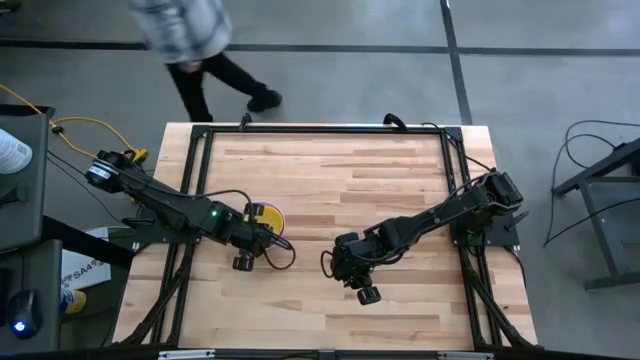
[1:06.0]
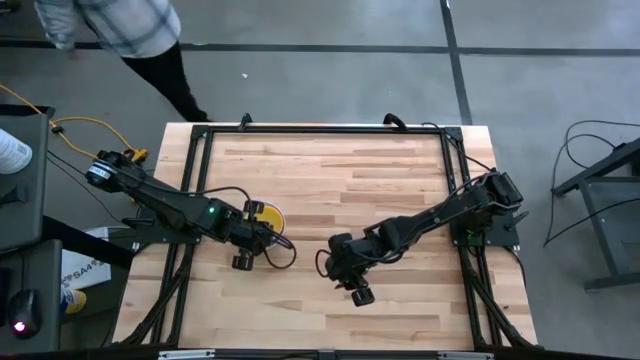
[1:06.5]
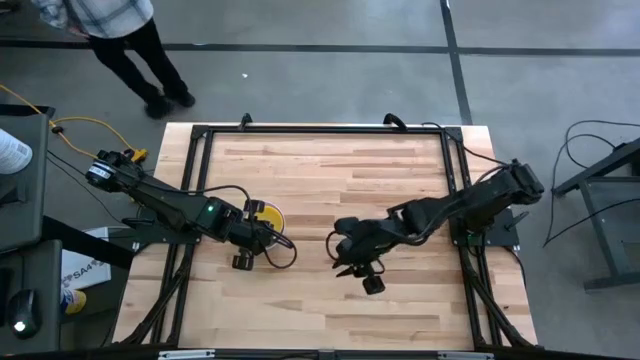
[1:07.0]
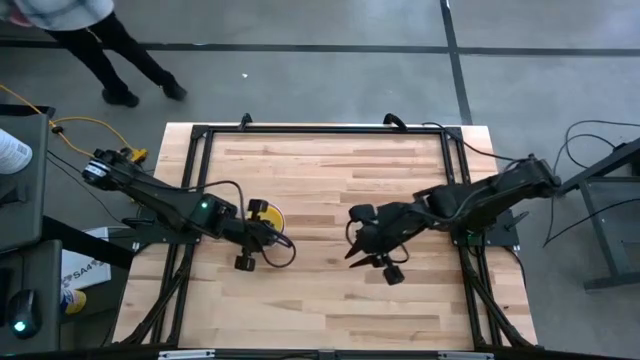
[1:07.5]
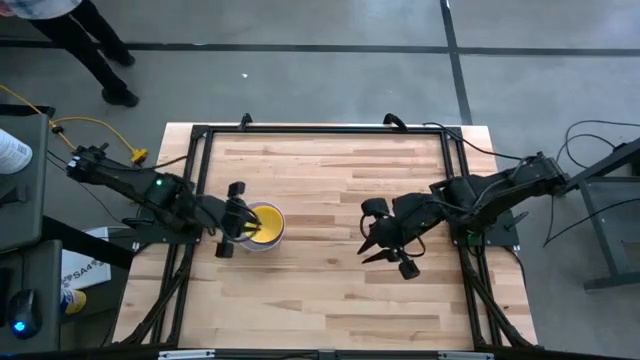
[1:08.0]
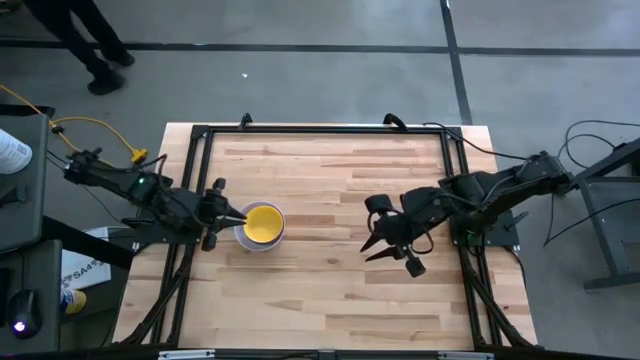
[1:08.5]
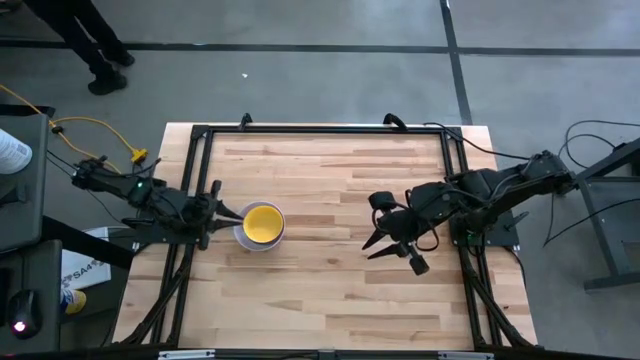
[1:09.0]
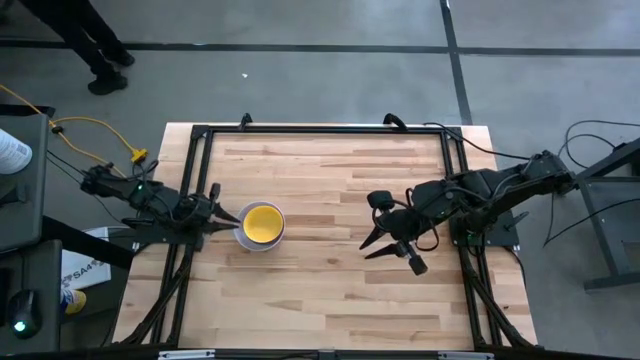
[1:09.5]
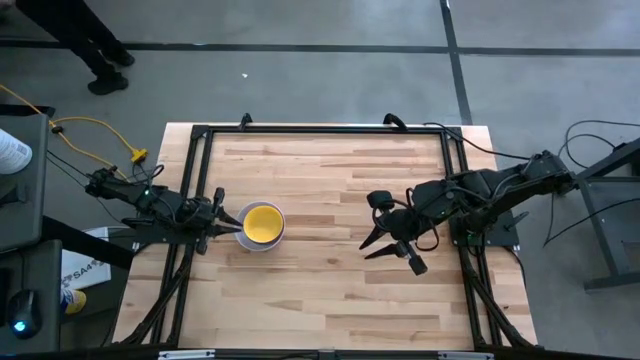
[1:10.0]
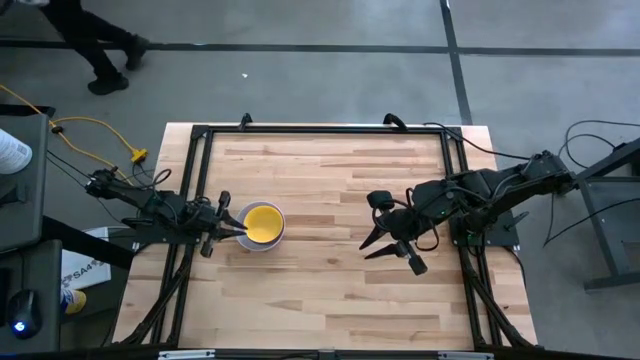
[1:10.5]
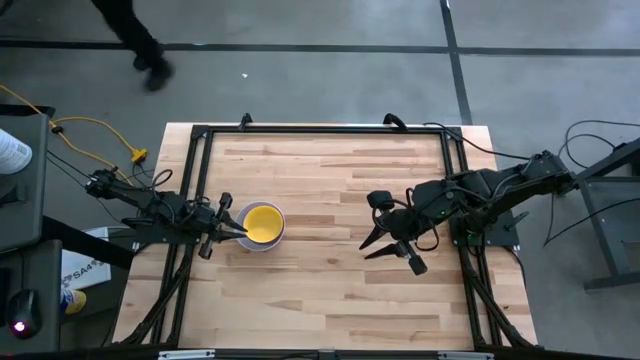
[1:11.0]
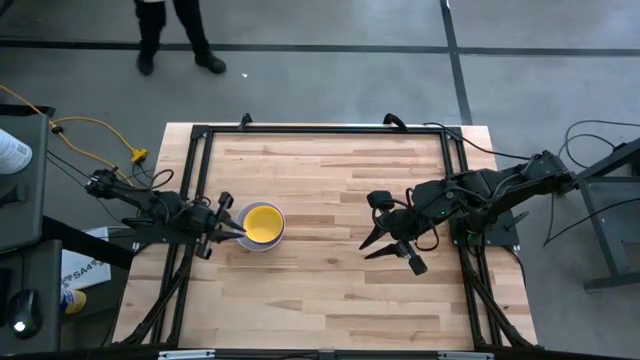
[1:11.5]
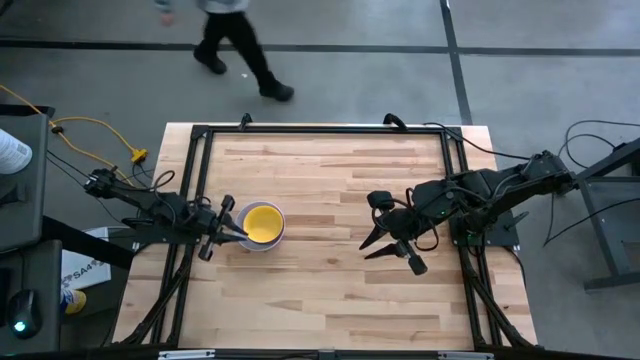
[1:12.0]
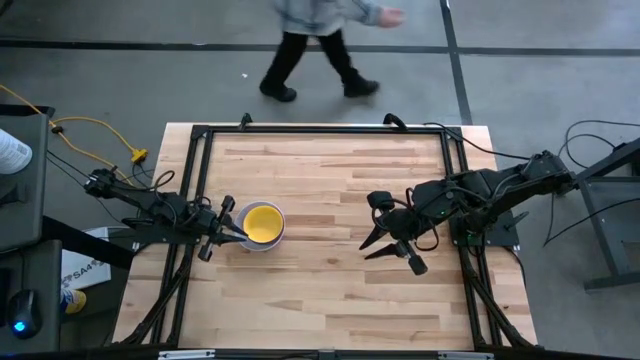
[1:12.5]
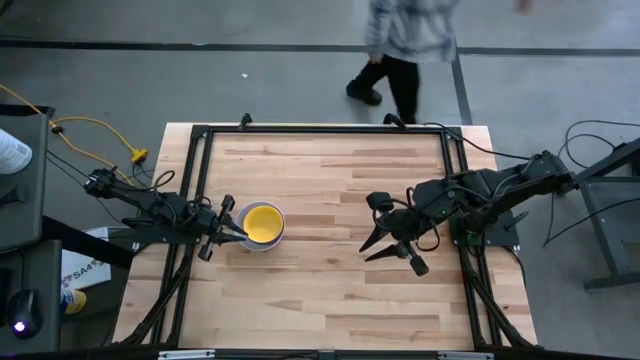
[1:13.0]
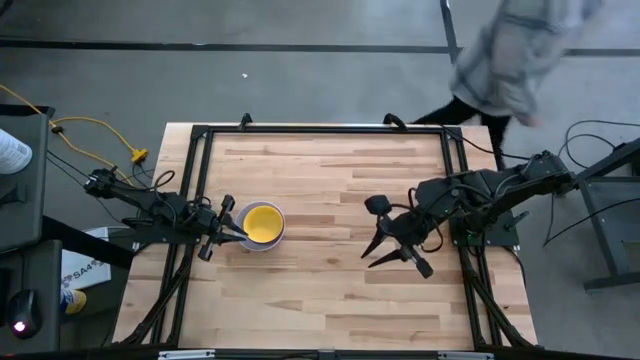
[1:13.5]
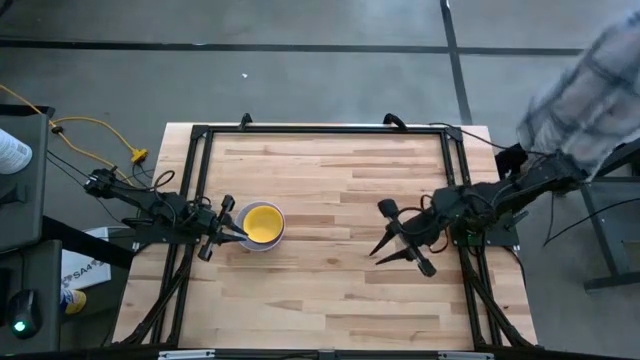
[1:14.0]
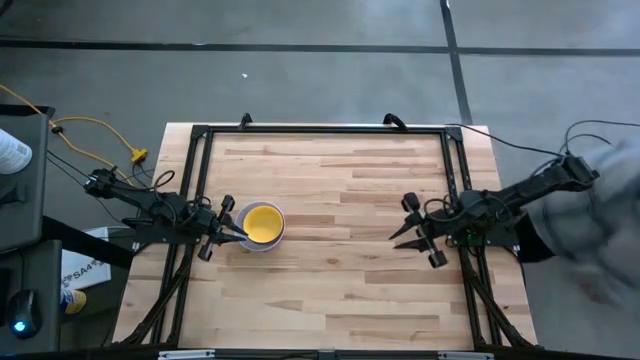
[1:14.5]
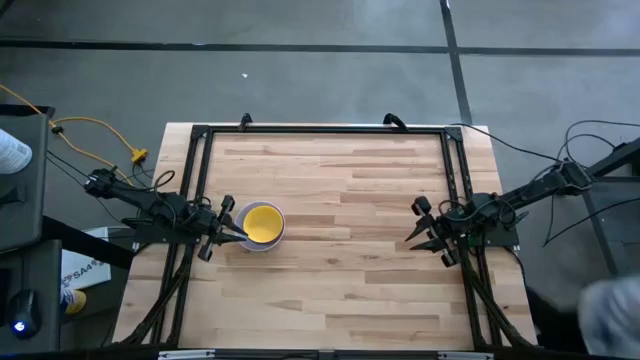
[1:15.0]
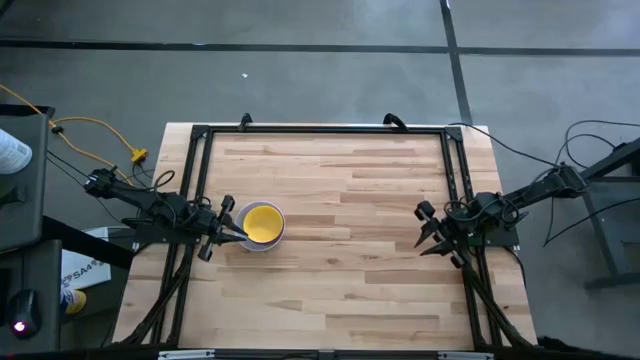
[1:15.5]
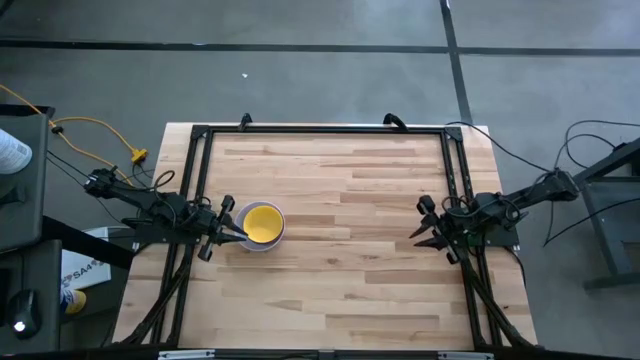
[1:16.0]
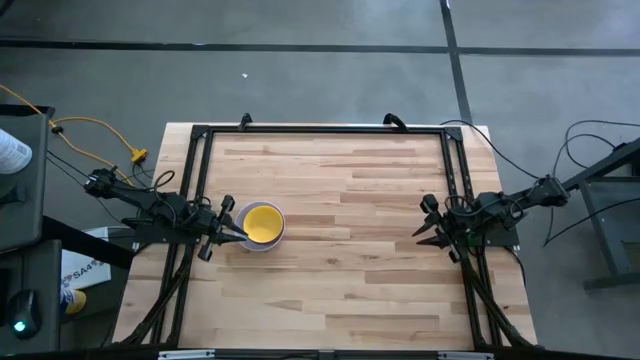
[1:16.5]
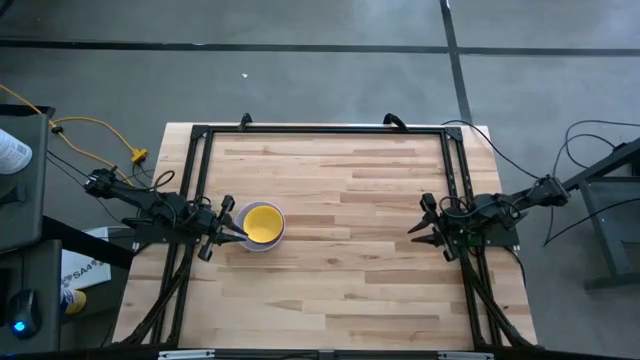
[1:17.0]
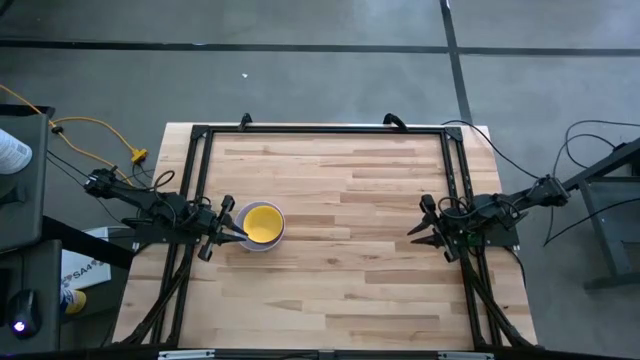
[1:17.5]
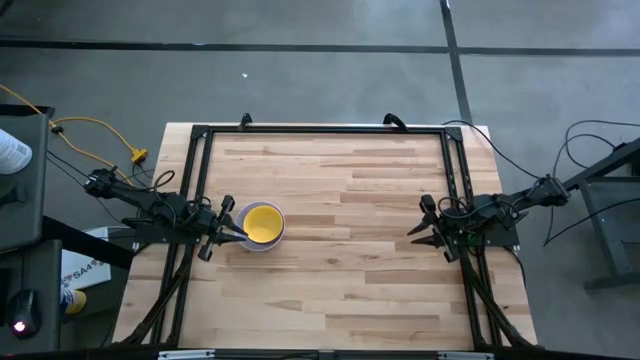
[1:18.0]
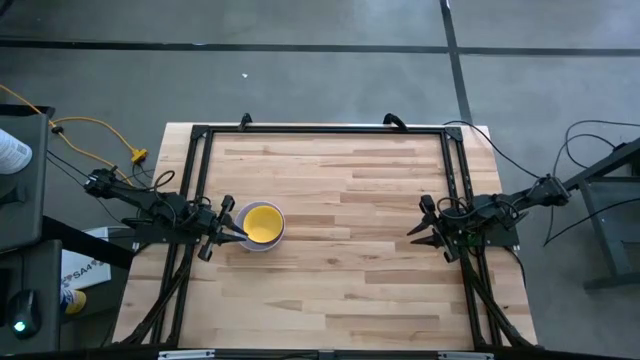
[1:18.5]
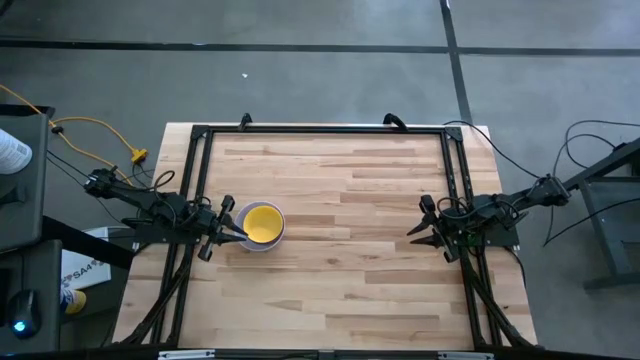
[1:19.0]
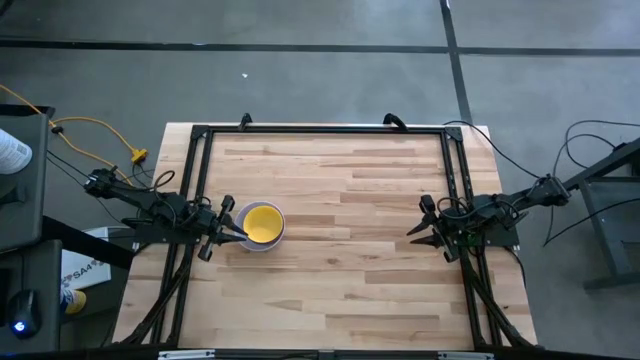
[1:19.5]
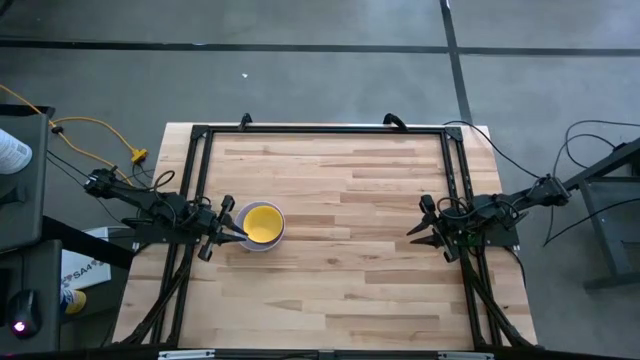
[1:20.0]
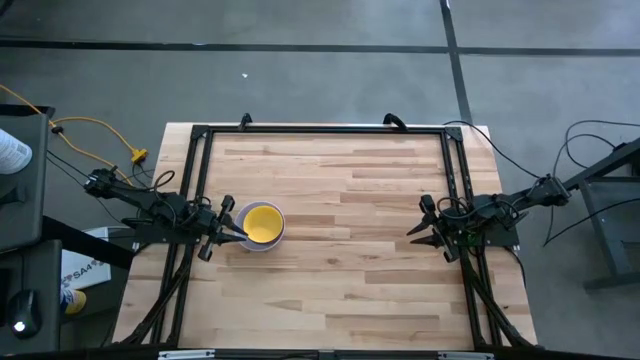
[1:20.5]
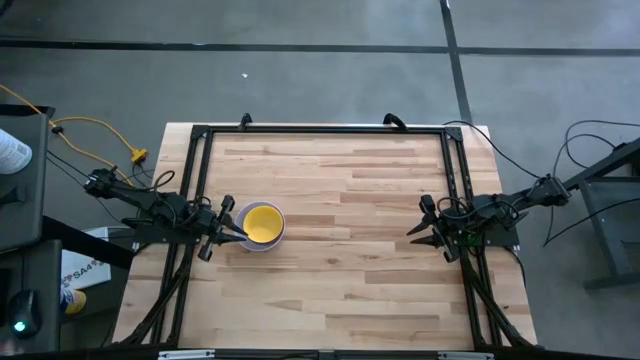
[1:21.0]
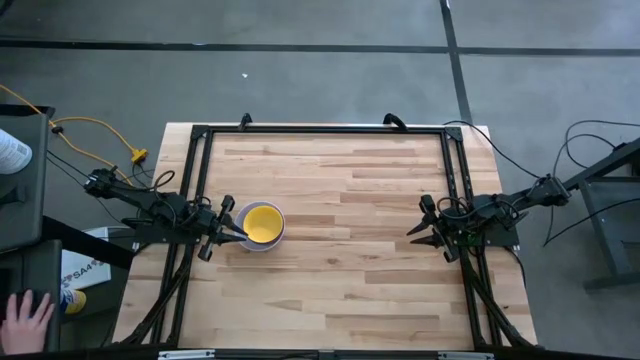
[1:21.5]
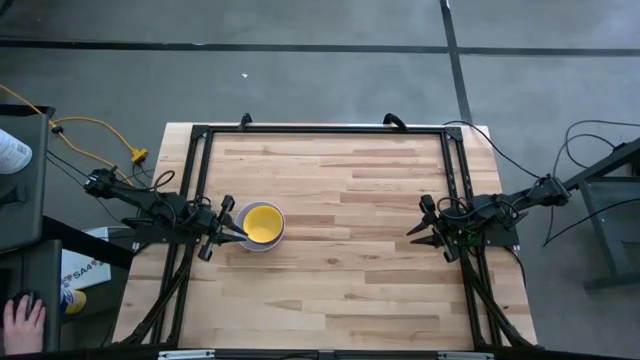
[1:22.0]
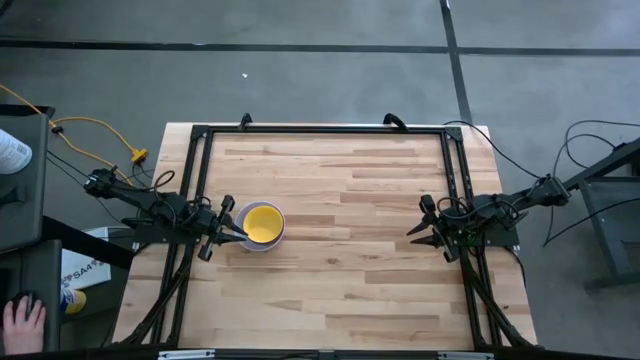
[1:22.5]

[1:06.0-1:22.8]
Return to Home Position
